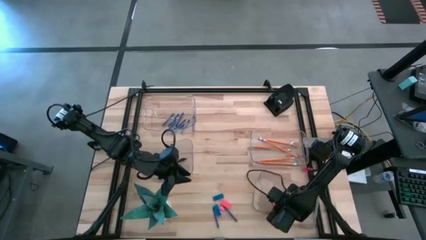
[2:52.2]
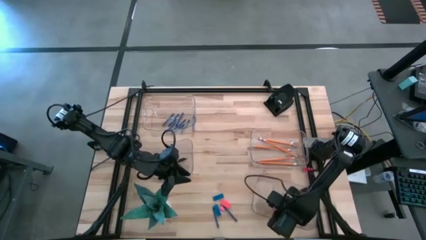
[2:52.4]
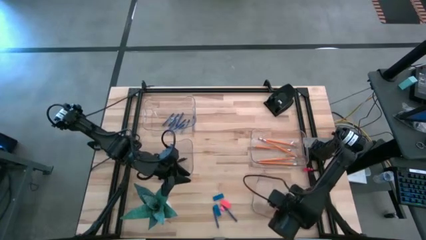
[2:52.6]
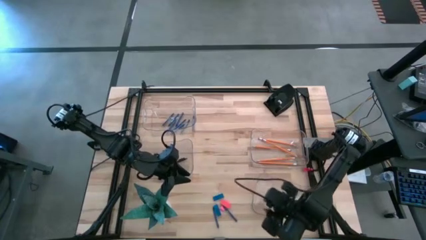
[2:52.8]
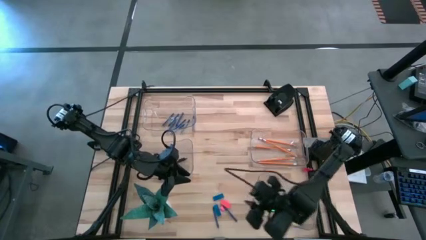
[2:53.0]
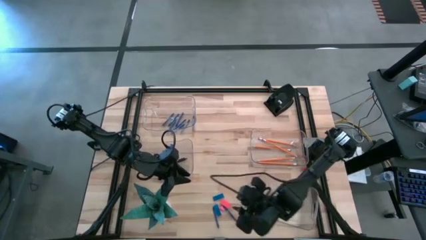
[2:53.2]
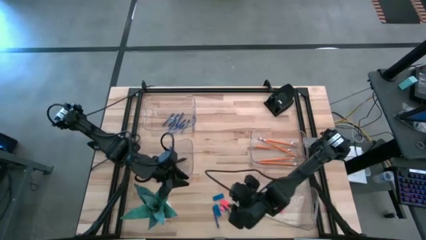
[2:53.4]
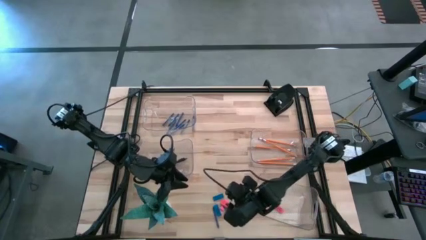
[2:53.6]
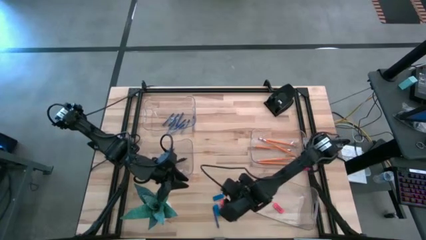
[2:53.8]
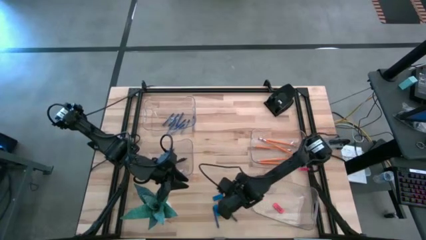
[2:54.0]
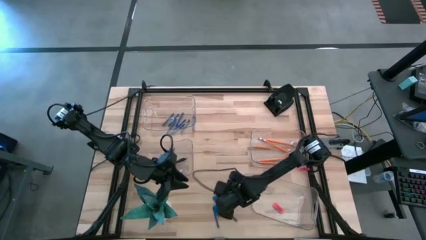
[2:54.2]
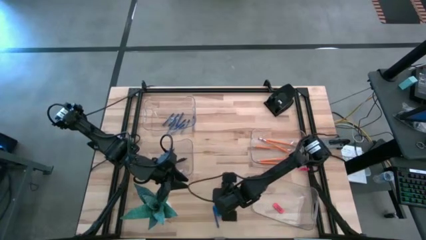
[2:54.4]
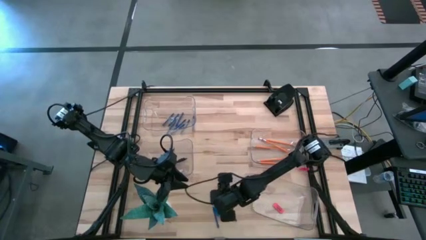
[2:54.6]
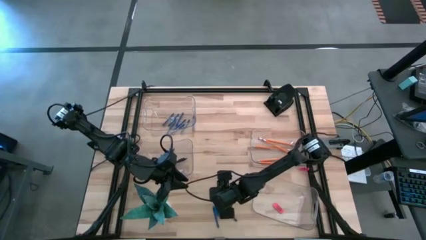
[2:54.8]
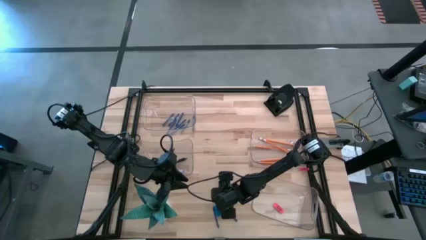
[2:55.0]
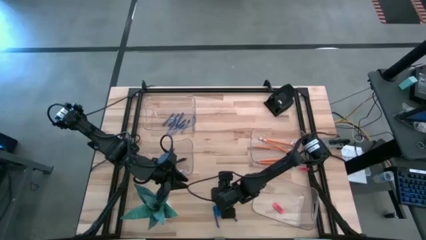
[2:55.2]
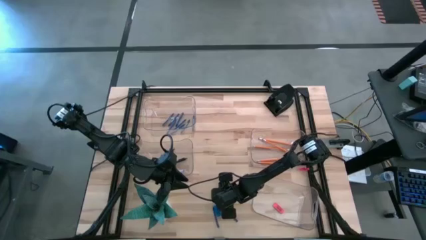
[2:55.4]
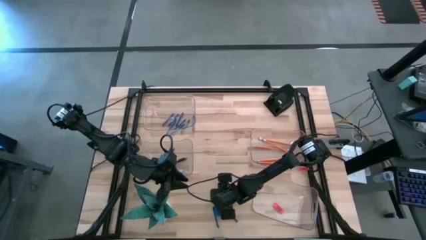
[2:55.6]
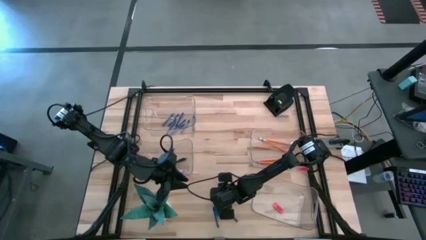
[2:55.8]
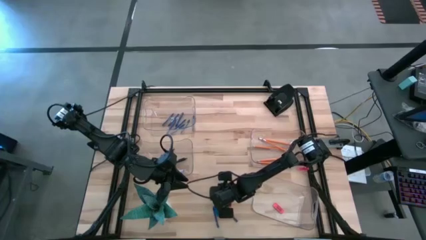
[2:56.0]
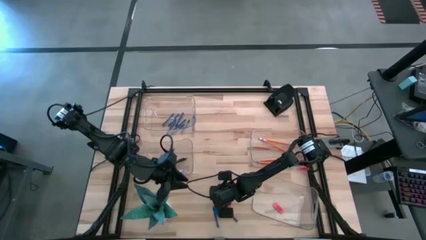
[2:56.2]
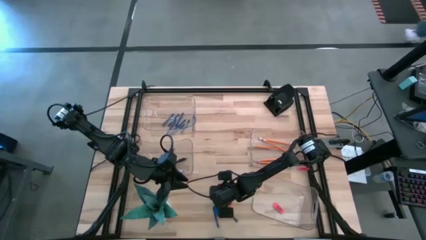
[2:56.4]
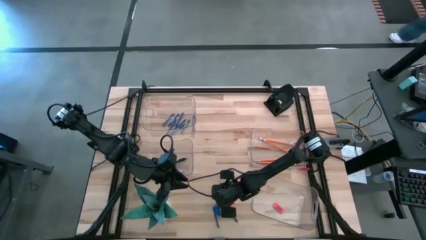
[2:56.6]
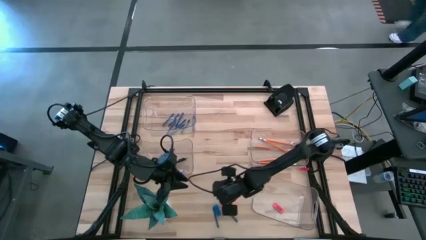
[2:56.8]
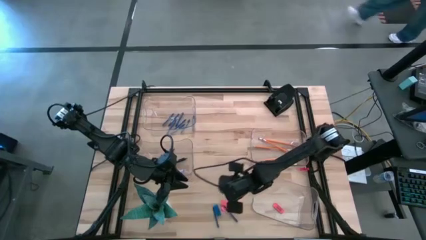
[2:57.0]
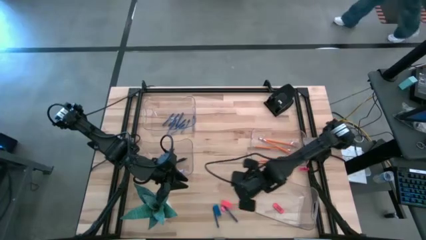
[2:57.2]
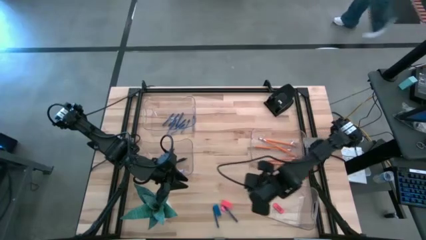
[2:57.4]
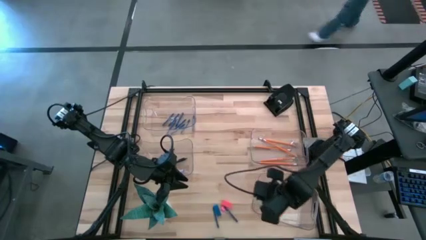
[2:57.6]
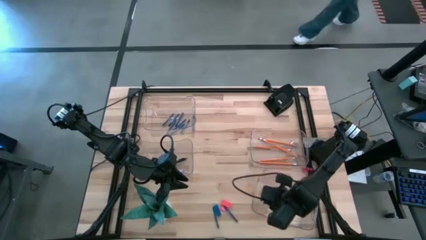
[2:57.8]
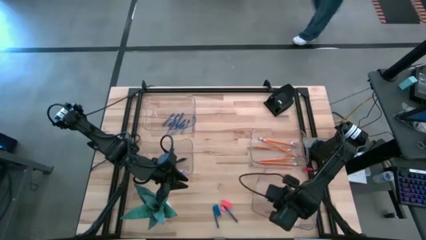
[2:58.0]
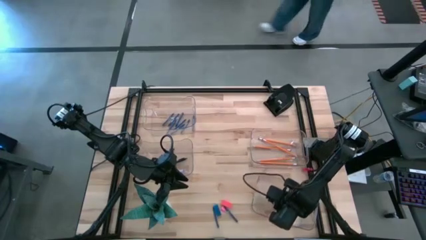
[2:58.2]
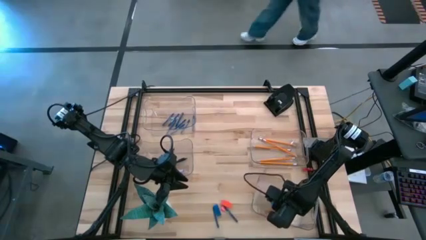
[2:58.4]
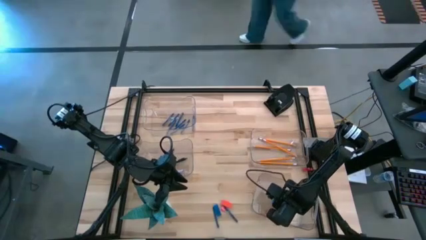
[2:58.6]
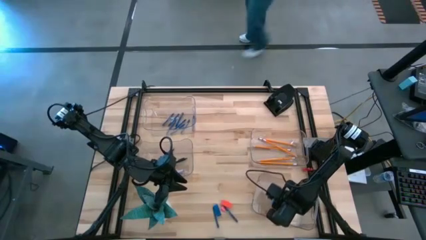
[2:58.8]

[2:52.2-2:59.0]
Task: Sort crayons/erasers/pens/pencils in bins
Put the blue eraser into the bottom transparent bin

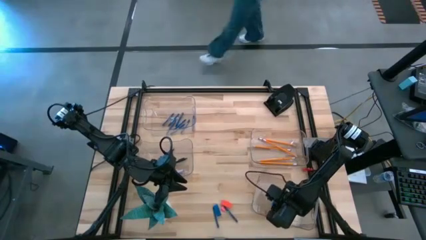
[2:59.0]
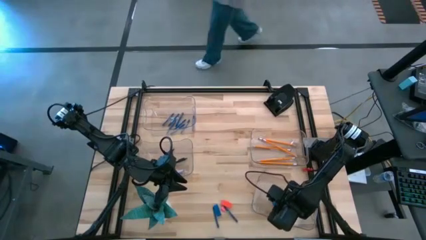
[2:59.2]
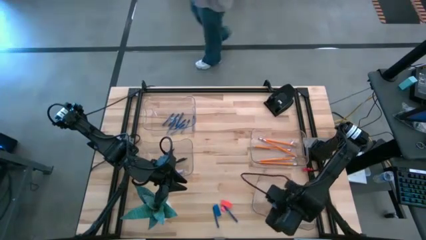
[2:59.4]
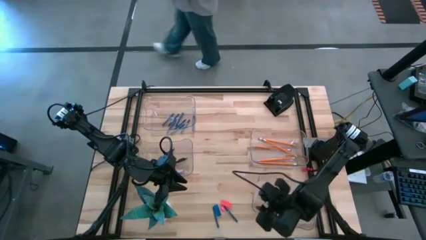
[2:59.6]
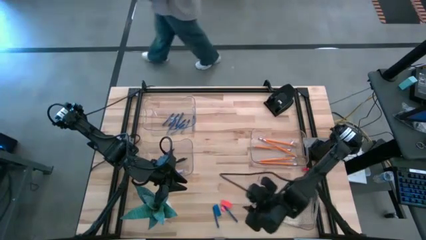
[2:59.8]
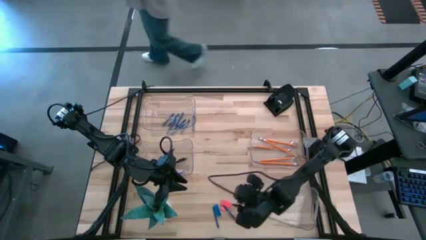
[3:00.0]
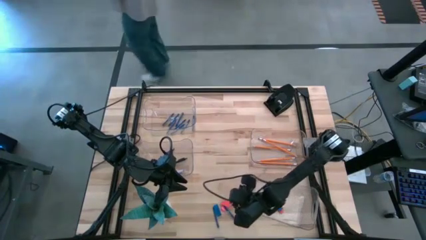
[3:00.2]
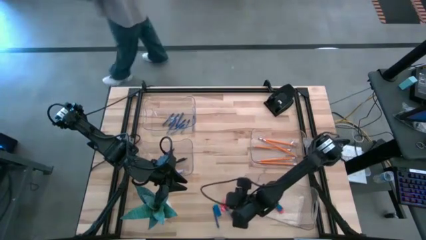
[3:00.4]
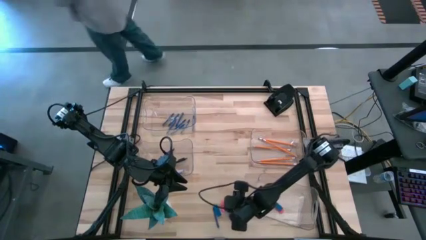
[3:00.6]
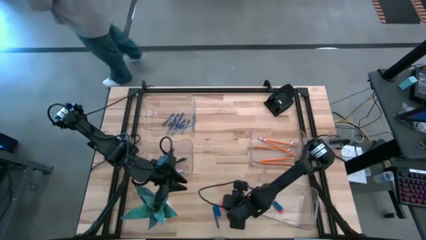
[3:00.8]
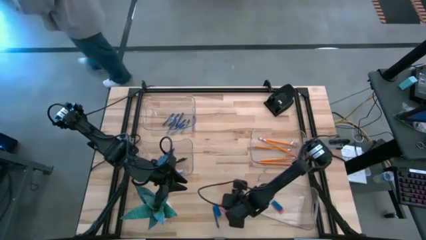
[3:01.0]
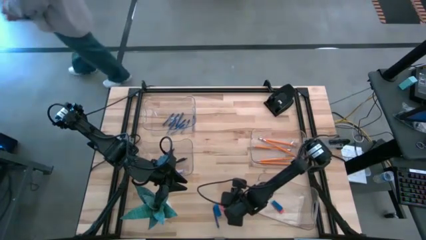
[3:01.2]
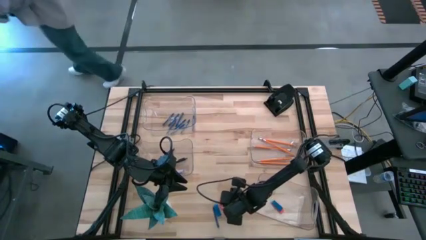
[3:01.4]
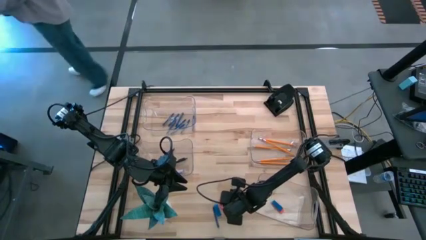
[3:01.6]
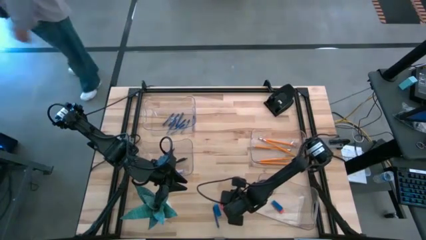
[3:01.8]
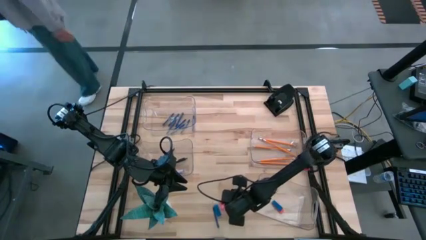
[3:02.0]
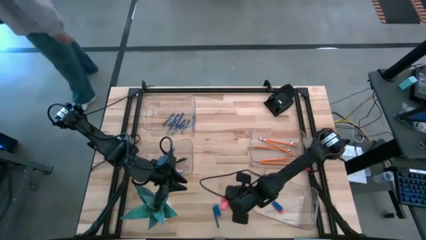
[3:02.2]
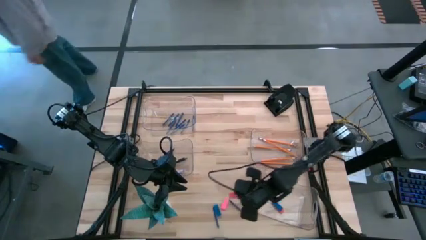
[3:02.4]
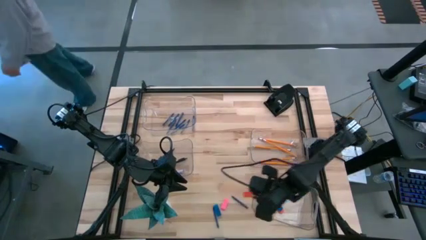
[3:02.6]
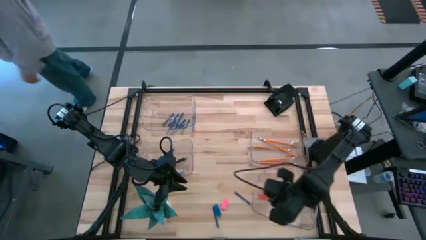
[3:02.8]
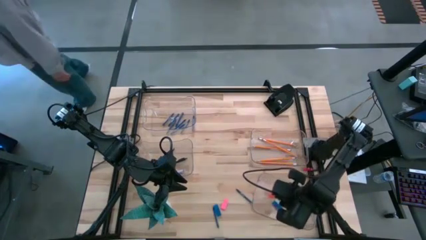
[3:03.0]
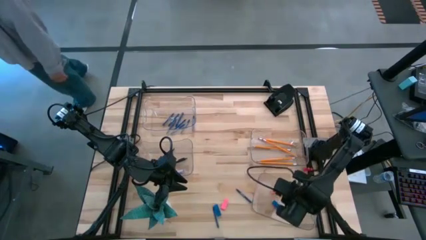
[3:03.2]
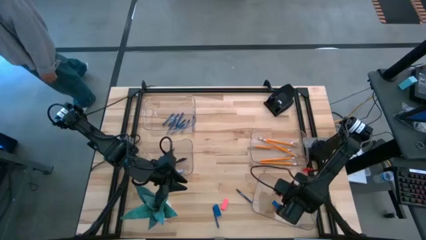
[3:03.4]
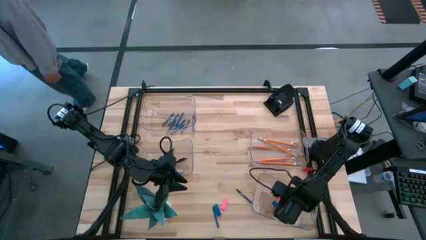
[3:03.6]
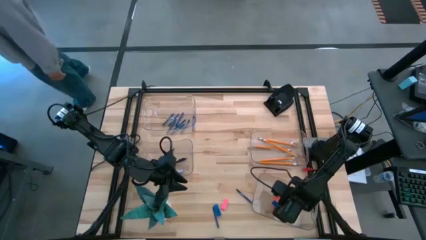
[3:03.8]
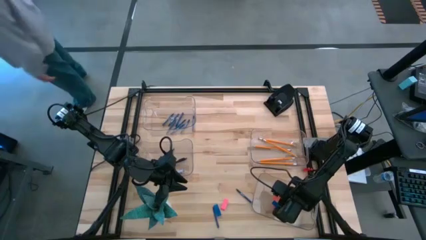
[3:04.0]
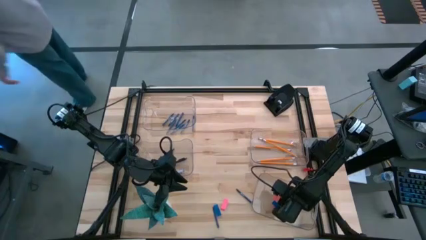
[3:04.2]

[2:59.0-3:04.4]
Put the orange eraser into the bottom transparent bin

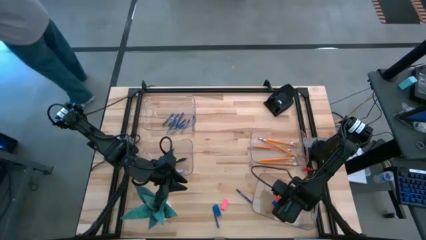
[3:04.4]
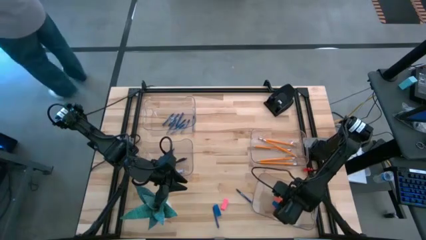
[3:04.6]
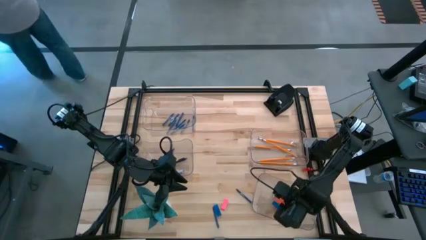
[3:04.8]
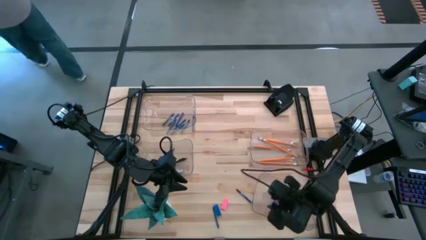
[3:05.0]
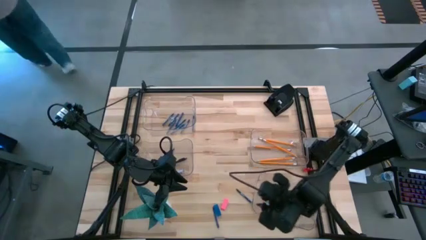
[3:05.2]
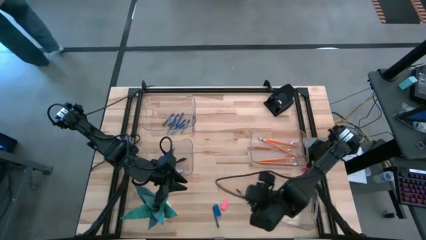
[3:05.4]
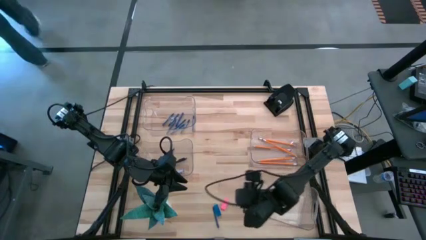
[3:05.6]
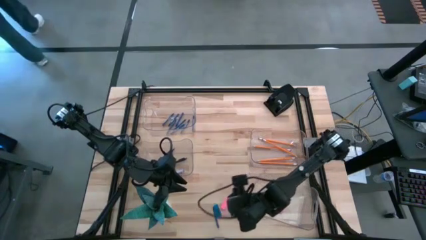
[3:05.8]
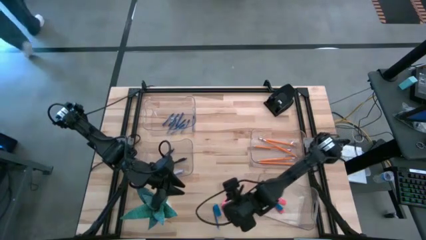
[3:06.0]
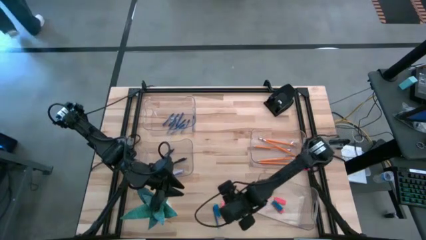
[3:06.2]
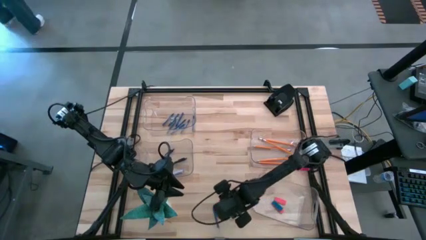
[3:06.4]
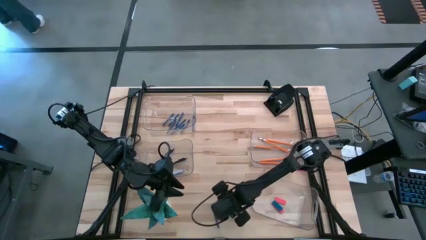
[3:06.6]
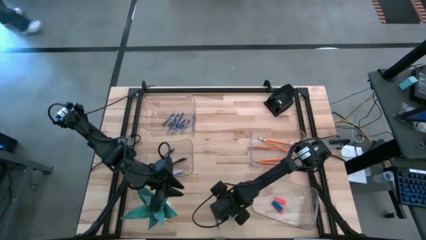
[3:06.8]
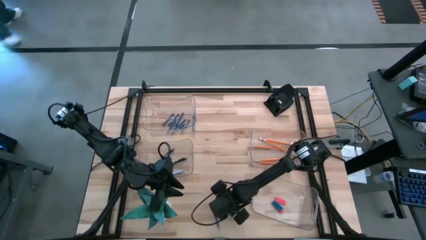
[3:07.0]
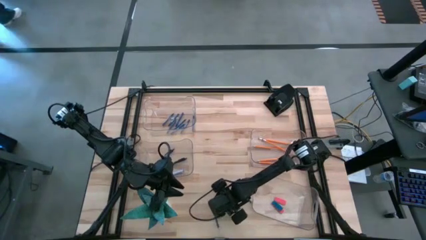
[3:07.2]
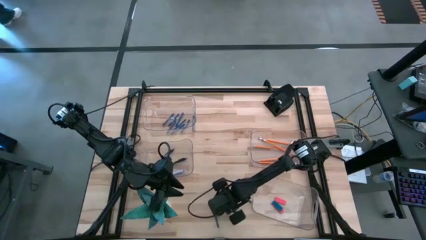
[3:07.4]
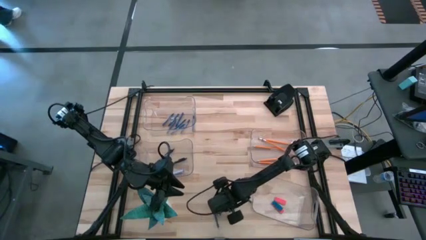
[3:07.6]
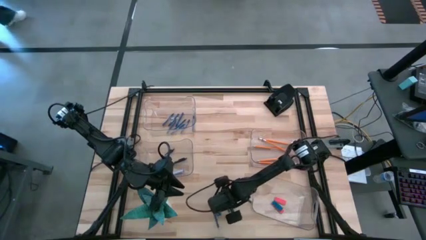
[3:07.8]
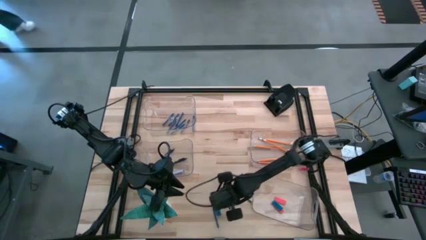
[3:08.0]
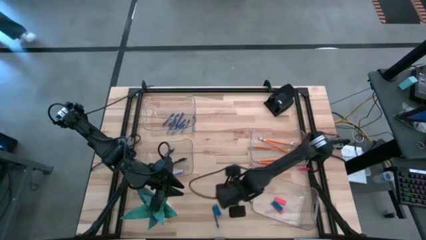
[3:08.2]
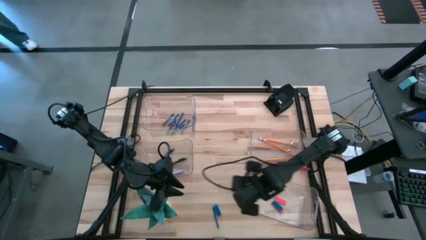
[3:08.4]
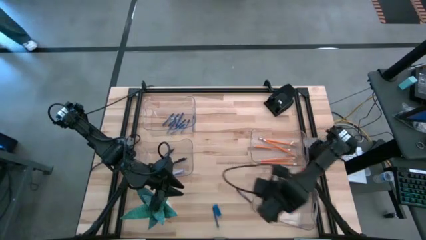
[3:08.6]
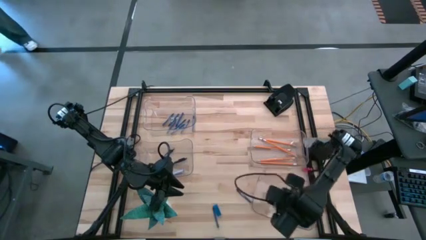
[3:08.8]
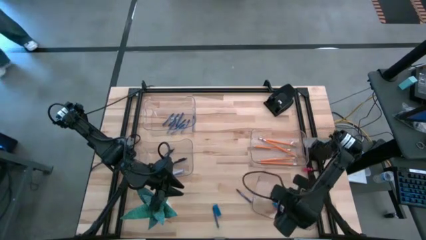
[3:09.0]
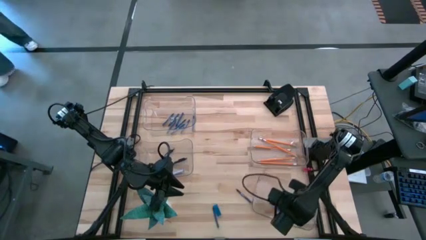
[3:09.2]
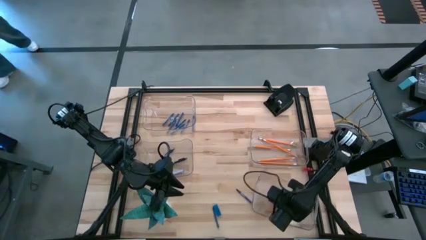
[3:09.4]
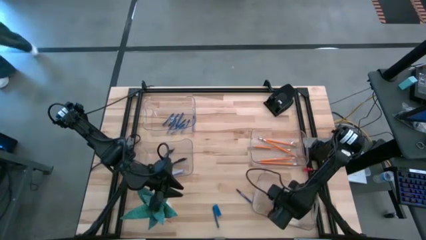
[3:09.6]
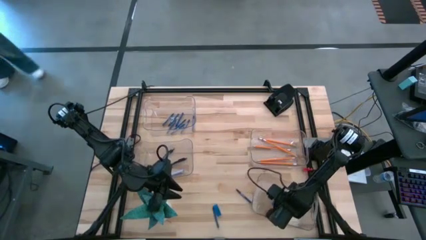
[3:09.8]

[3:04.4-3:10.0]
Put the pink eraser into the bottom transparent bin
